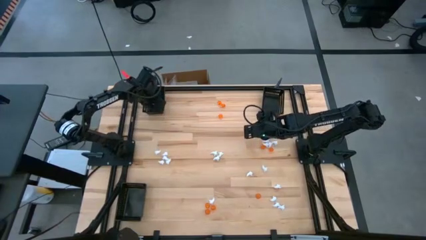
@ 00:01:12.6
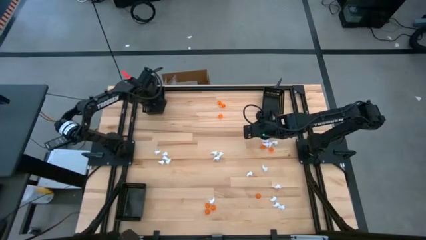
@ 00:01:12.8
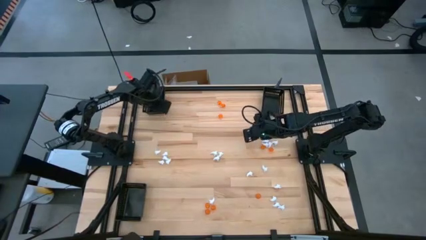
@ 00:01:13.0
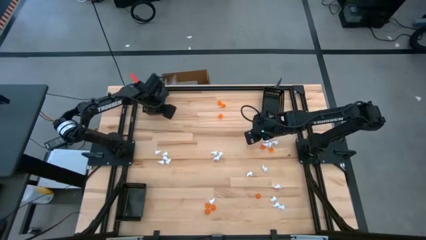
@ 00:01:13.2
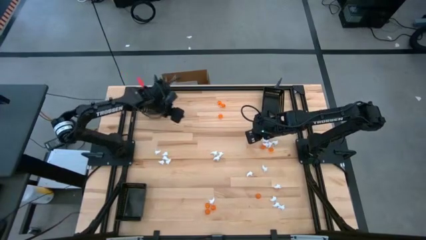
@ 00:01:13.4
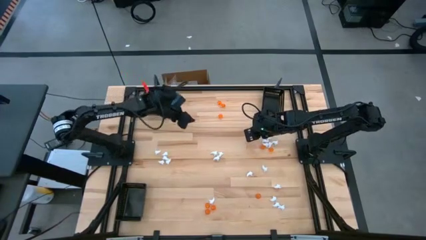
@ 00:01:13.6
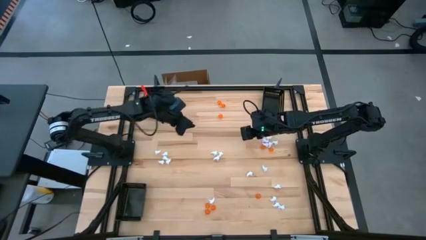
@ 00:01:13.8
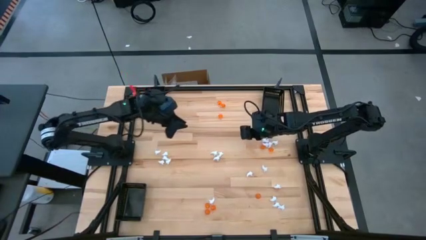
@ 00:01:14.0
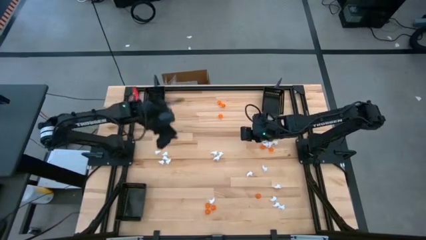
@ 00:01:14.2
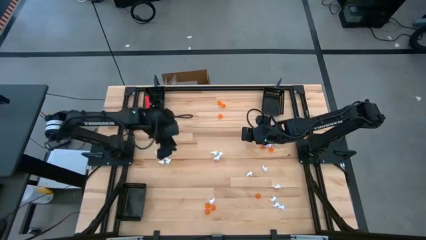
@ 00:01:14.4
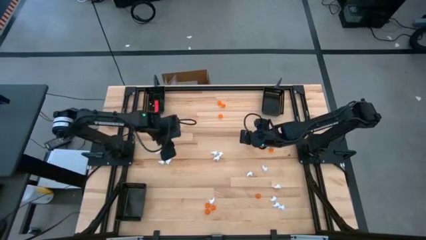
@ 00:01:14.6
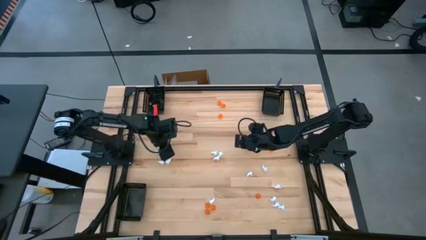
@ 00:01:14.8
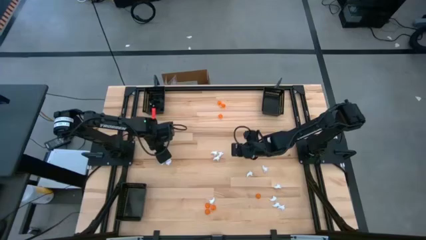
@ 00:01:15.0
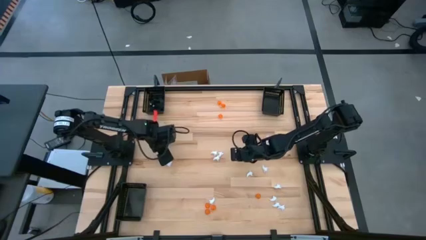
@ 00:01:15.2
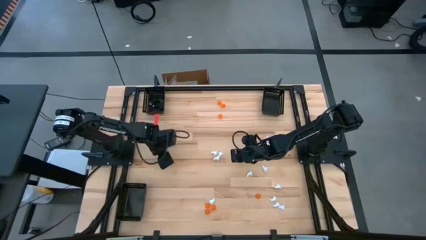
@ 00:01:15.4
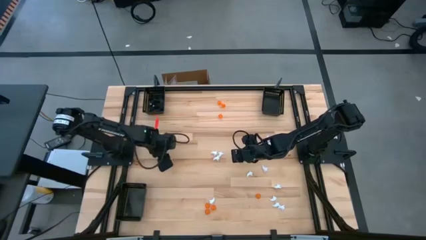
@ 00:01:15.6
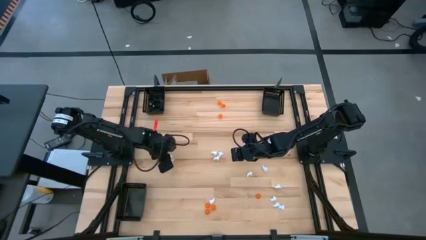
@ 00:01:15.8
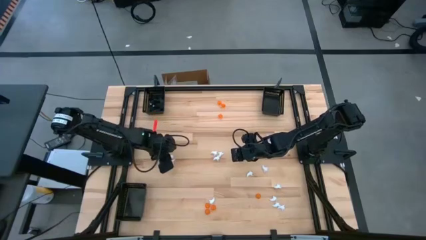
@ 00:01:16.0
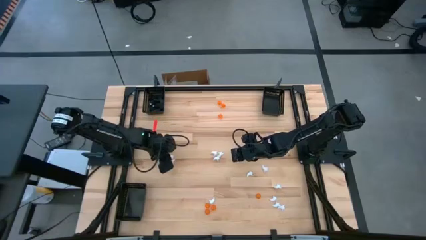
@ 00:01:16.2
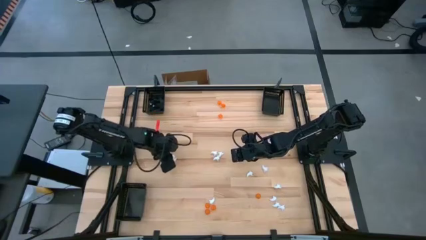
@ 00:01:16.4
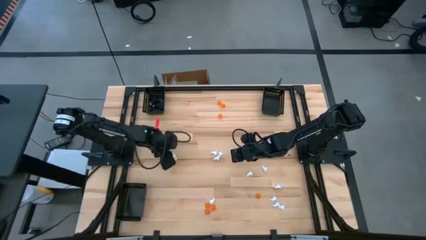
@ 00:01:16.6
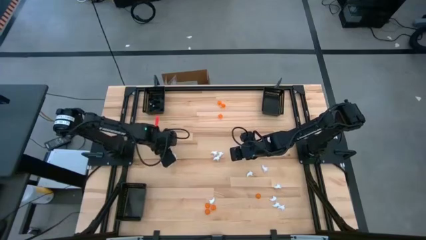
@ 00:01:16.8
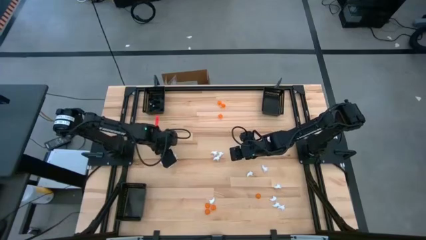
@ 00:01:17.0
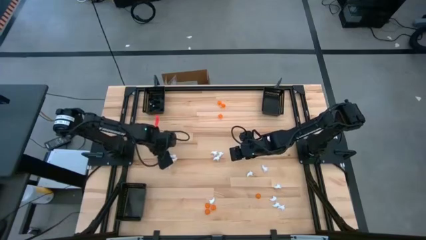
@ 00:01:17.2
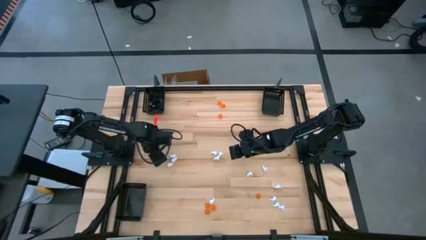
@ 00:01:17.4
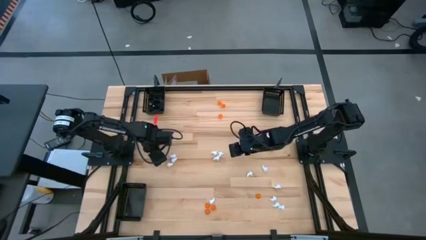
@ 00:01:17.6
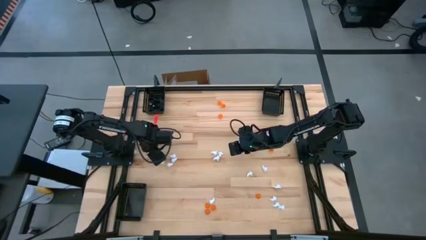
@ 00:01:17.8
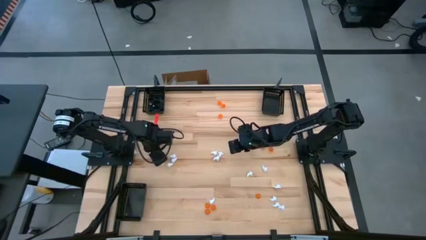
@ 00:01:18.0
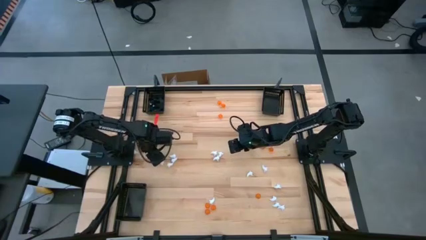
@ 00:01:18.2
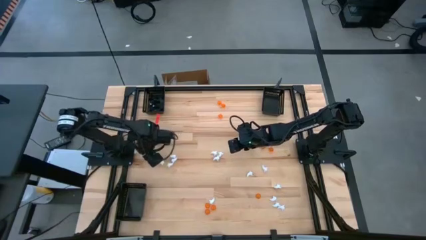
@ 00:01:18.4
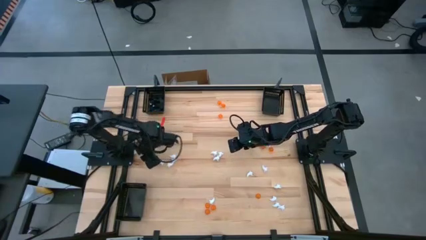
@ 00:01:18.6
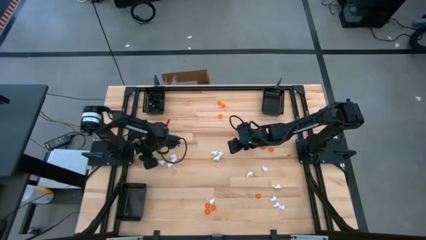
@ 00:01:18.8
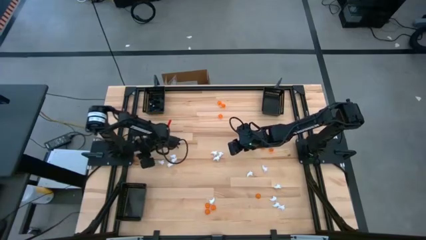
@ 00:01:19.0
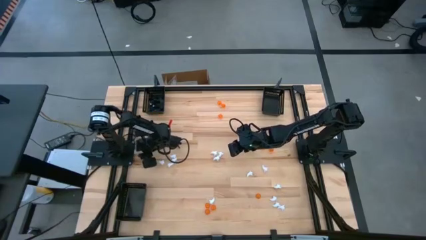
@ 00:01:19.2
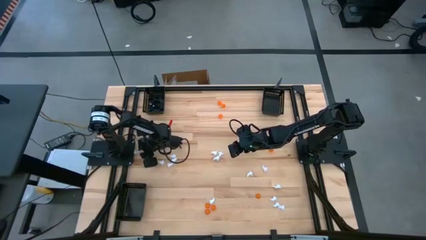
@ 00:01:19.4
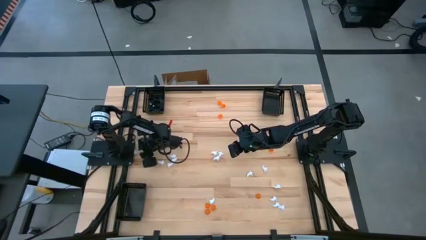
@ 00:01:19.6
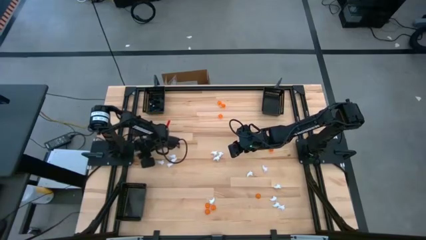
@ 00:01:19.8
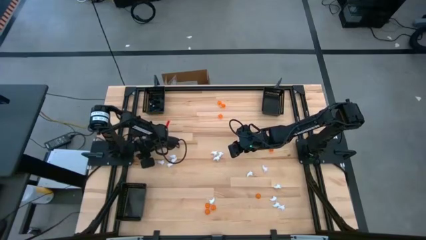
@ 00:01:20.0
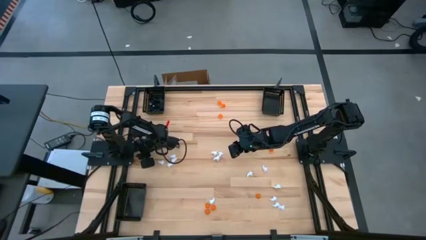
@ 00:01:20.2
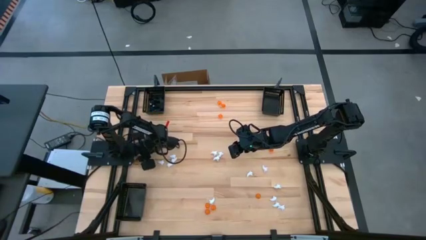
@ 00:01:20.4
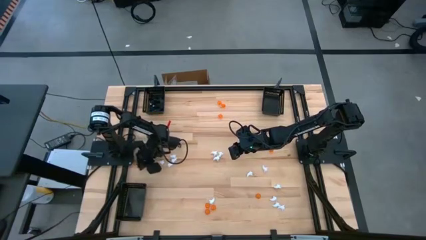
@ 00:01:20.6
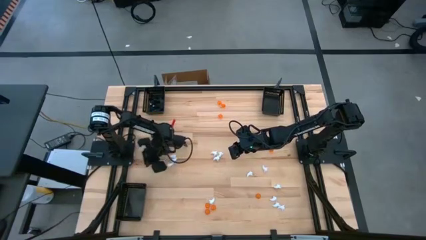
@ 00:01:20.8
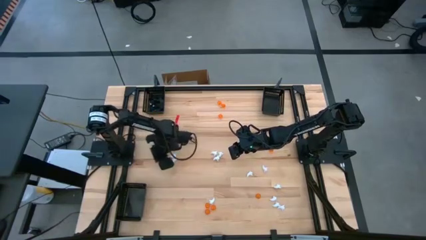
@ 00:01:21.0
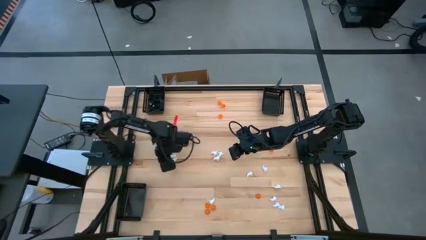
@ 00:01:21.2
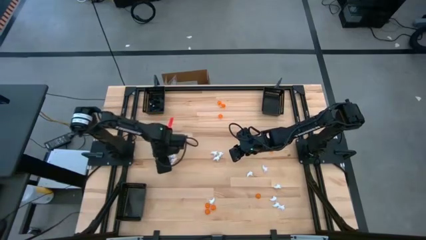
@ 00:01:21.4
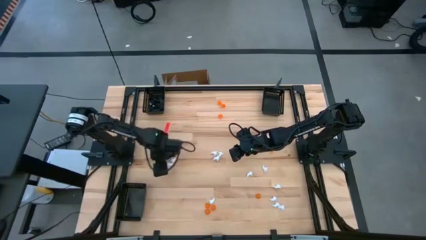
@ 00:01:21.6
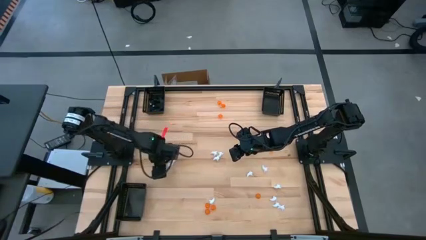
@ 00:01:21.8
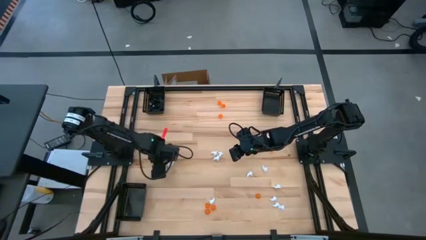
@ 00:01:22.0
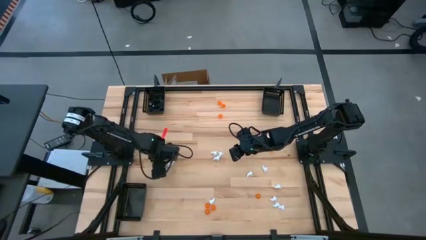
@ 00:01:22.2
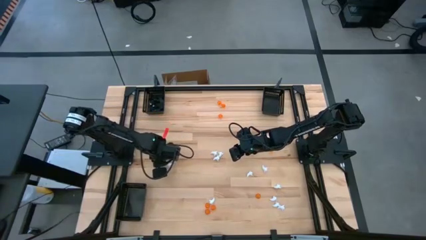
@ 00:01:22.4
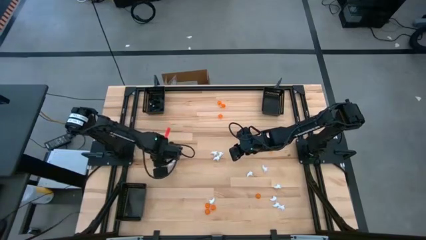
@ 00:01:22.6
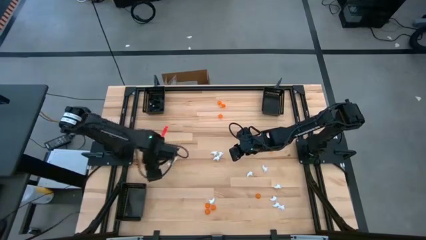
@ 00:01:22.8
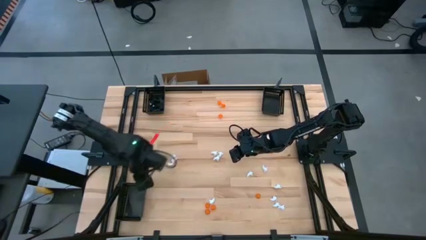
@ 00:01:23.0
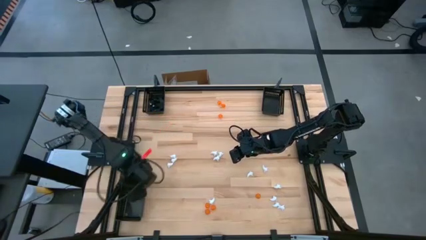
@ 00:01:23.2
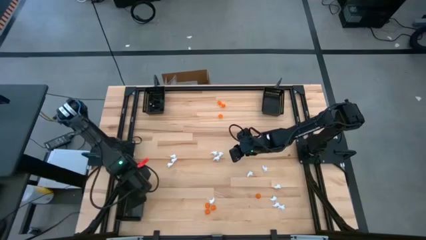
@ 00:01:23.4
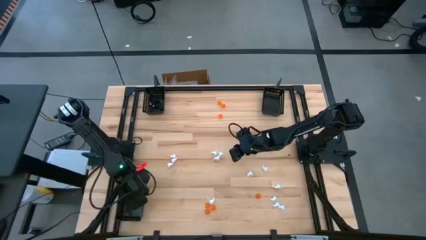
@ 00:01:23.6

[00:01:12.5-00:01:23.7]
Task: Sort Halloween decoration
Put the white ghost toy into the bottom black basket

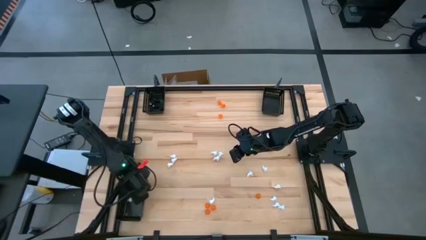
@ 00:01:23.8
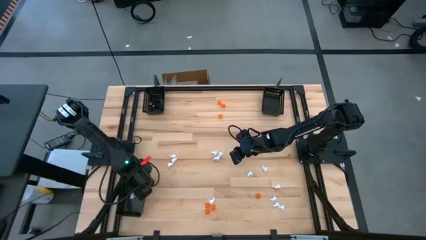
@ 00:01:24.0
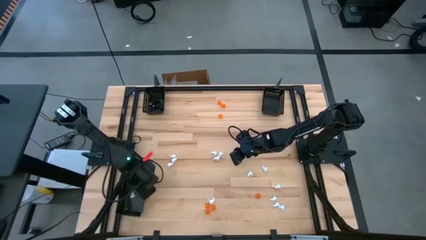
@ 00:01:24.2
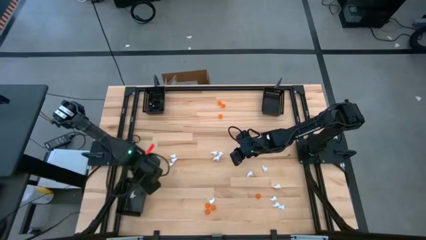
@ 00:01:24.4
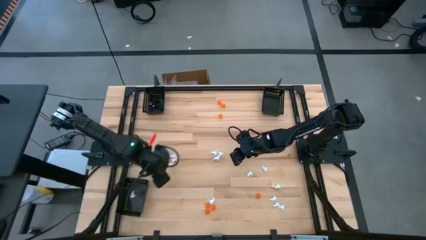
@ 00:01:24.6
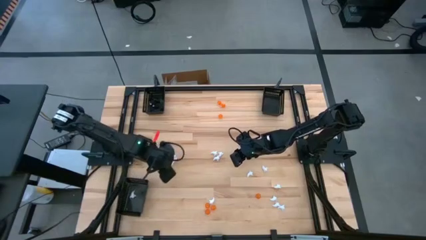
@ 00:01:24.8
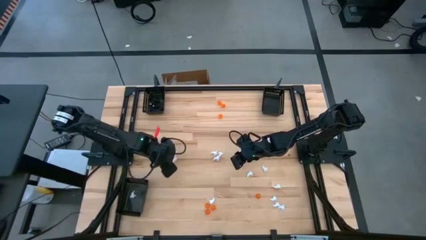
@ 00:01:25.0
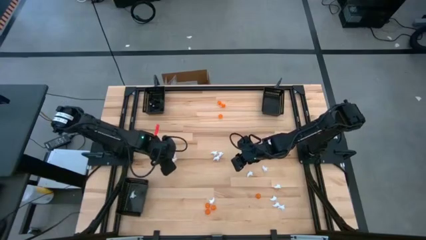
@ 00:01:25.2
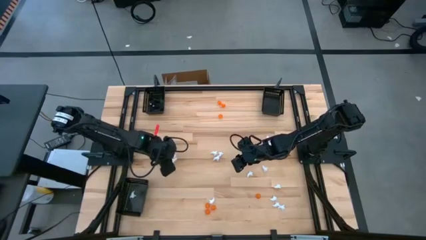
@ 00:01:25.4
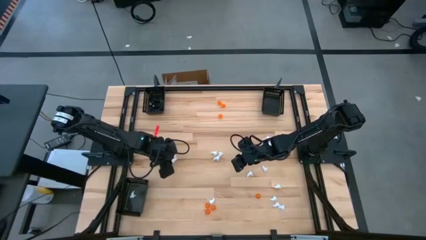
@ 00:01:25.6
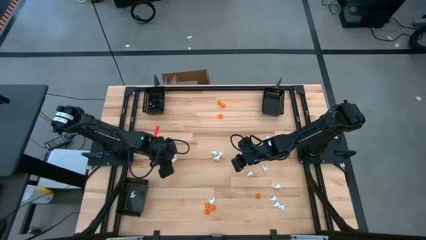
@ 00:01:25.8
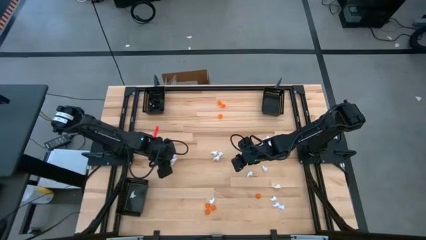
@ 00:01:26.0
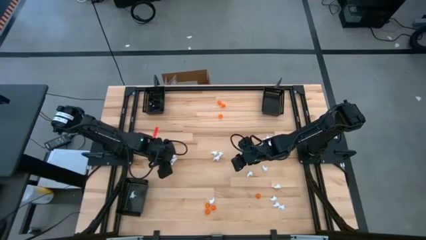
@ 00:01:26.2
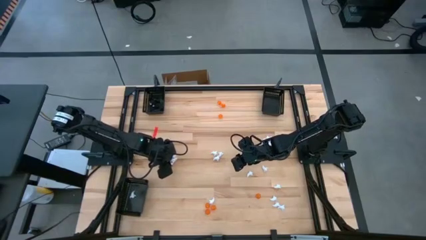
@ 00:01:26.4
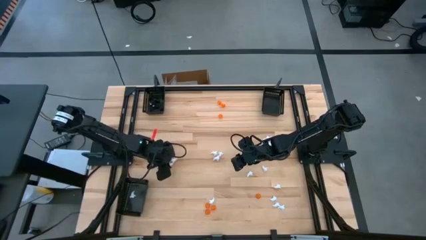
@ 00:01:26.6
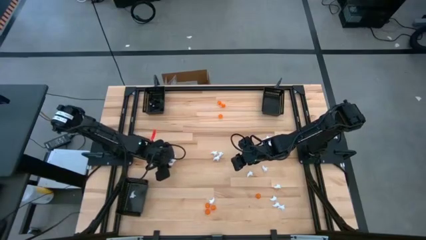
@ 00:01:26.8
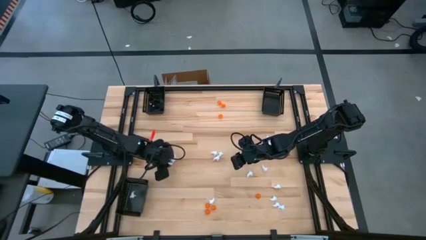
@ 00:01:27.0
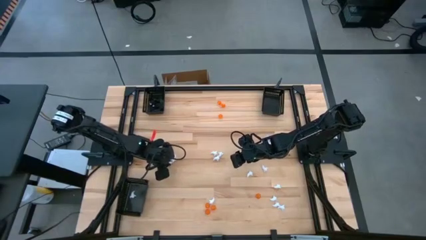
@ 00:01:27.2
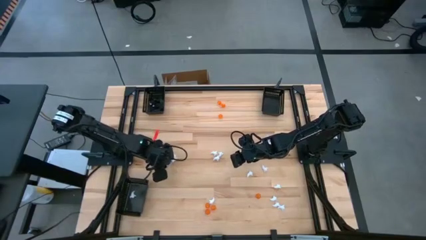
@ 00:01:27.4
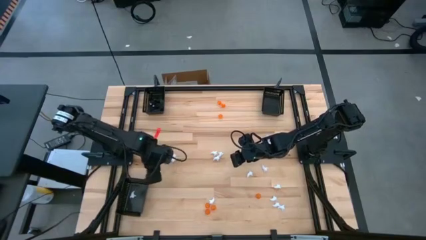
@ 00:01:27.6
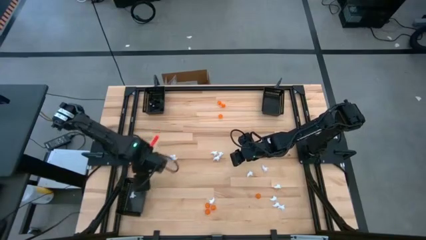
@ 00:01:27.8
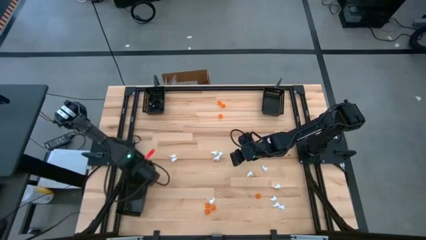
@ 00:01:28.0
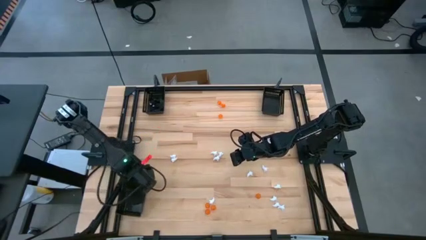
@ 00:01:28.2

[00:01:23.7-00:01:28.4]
Put the white ghost toy into the bottom black basket

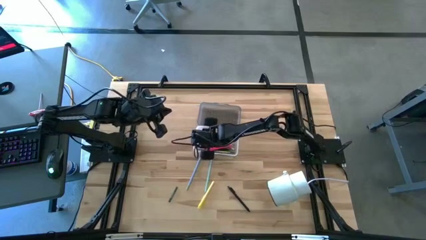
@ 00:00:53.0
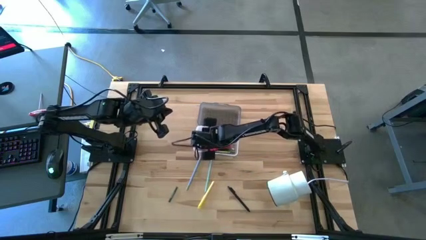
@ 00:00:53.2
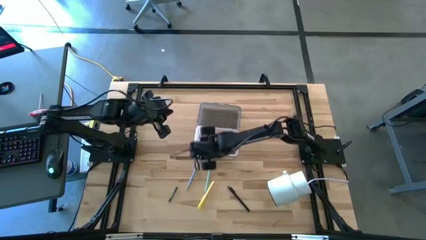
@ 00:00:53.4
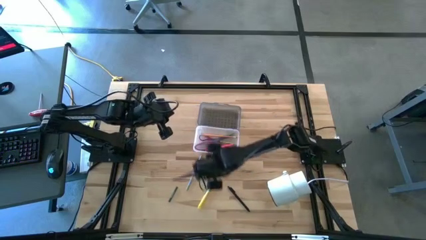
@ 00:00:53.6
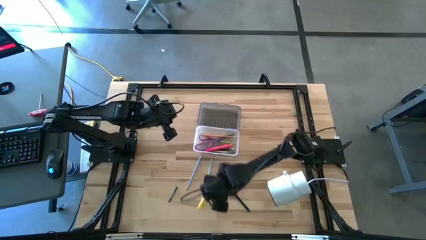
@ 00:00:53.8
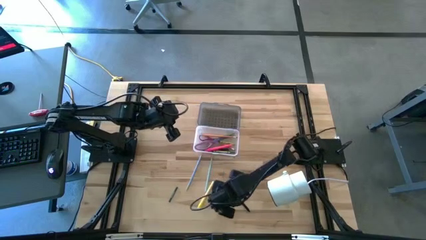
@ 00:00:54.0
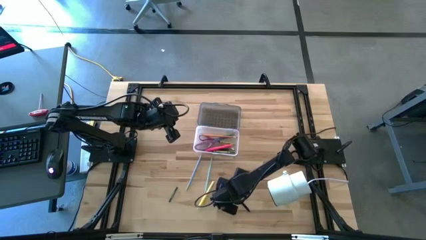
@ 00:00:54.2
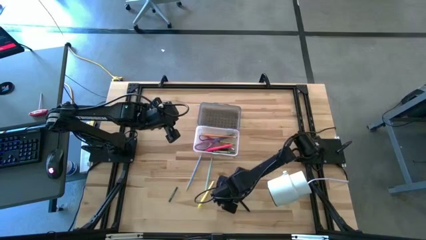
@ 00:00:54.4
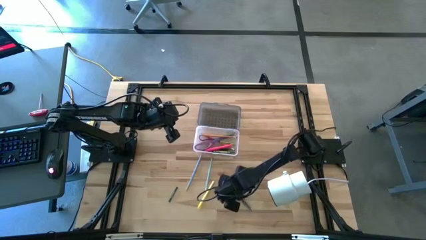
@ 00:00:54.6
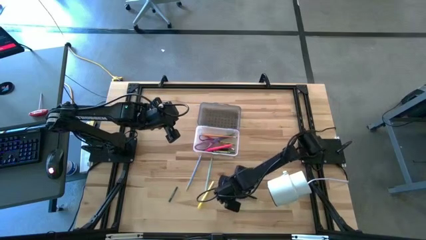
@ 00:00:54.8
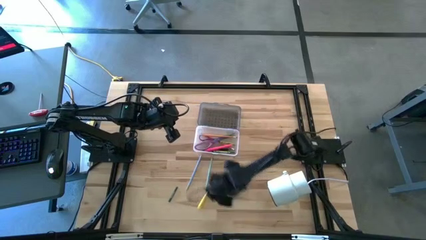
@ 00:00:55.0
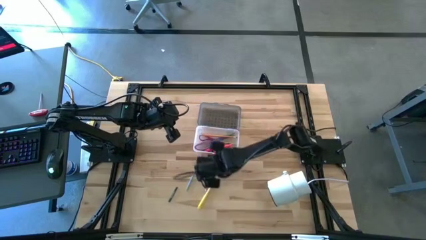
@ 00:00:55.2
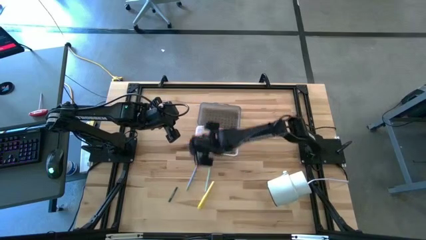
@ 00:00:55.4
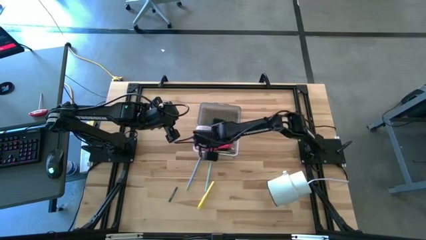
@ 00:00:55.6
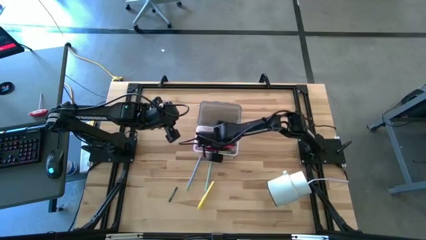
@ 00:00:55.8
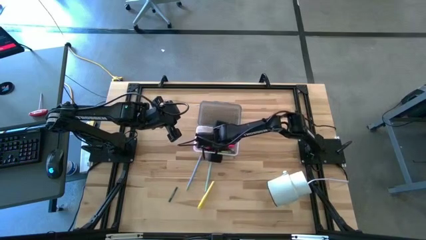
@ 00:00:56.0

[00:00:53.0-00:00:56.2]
Task: Pick & place school supplies into a supply box
Put the black pen into the black supply box
